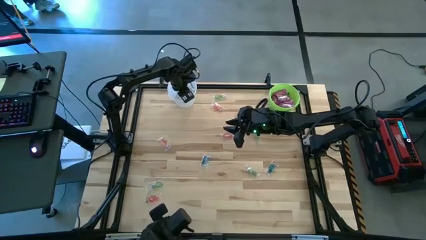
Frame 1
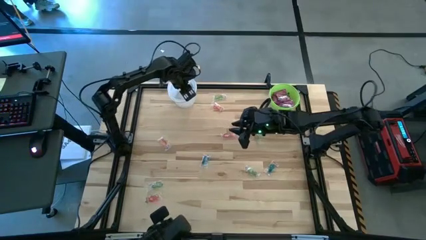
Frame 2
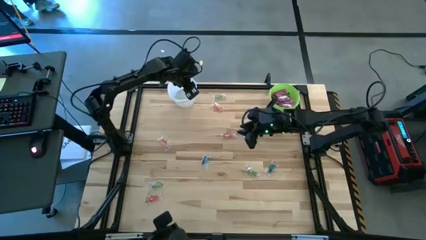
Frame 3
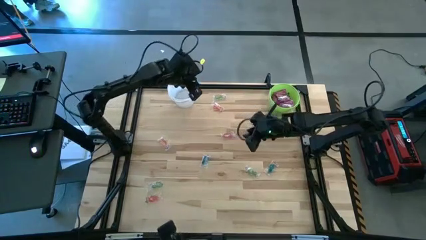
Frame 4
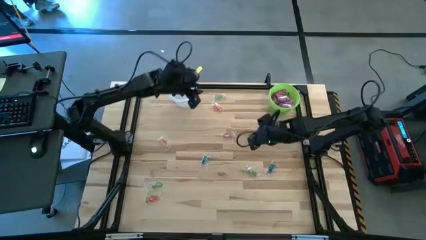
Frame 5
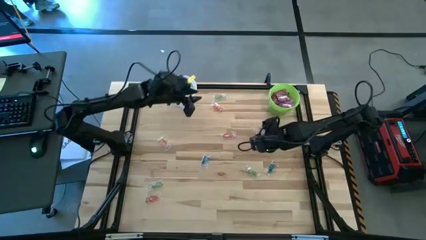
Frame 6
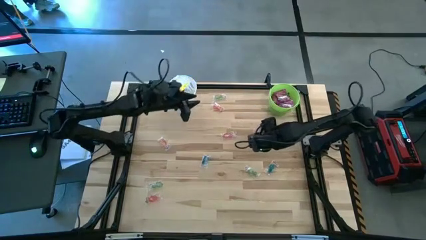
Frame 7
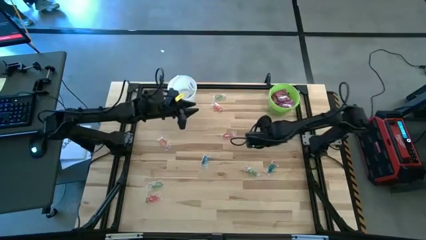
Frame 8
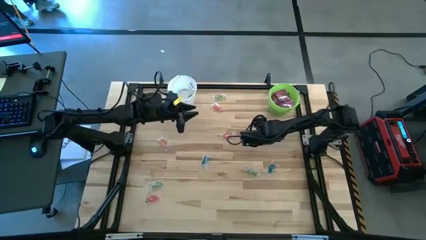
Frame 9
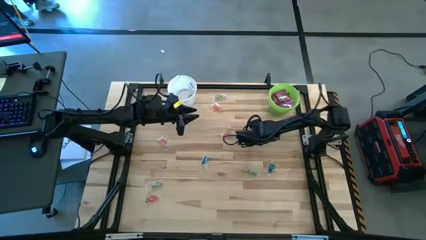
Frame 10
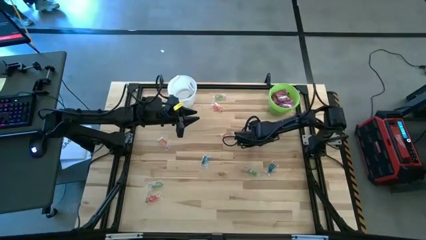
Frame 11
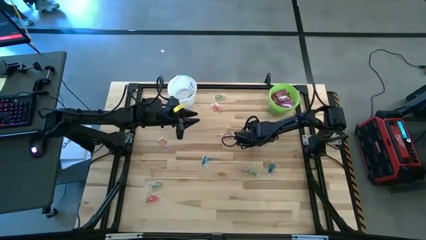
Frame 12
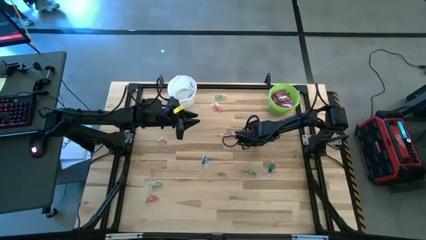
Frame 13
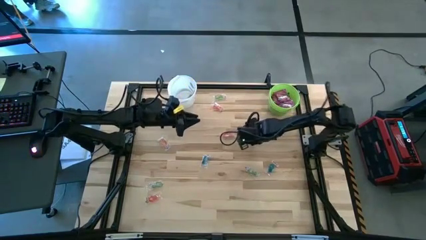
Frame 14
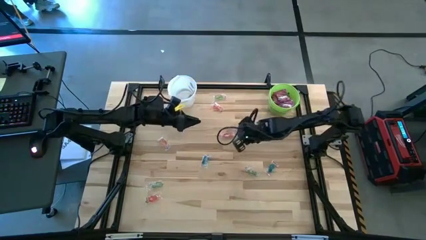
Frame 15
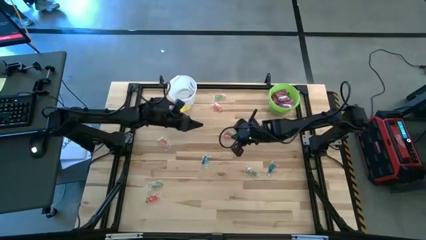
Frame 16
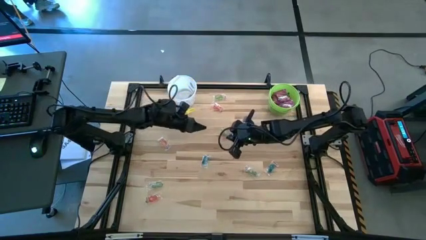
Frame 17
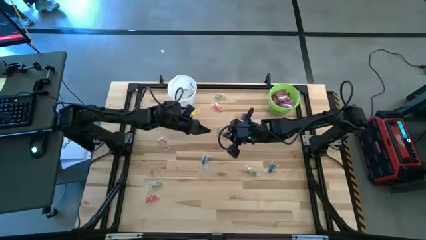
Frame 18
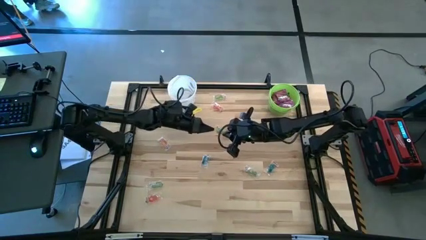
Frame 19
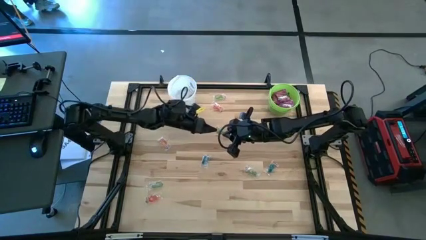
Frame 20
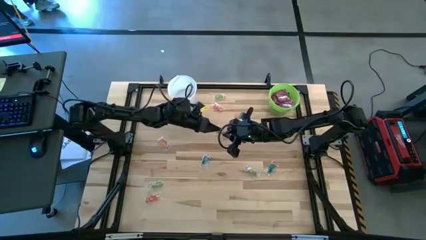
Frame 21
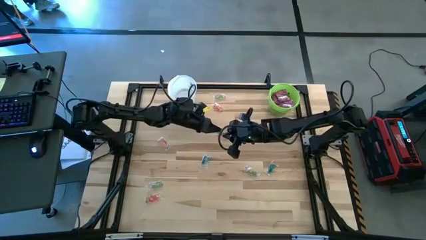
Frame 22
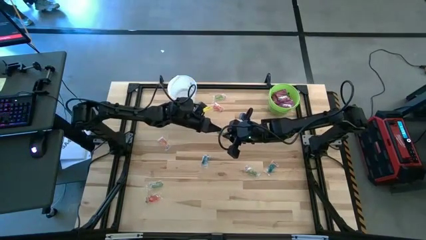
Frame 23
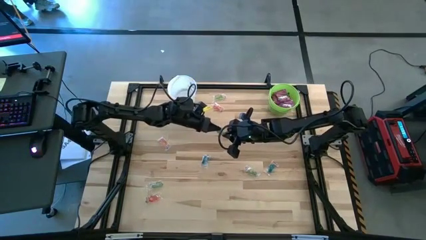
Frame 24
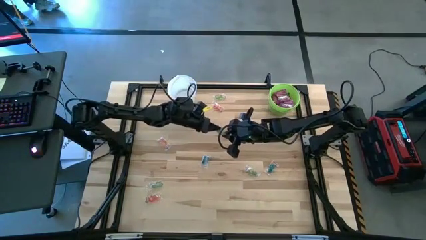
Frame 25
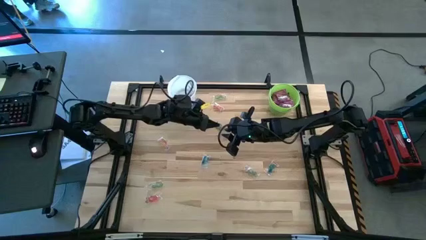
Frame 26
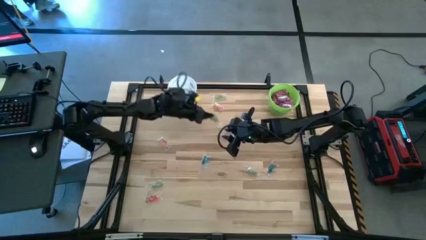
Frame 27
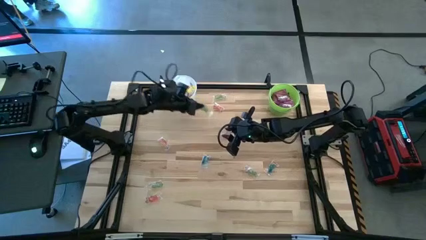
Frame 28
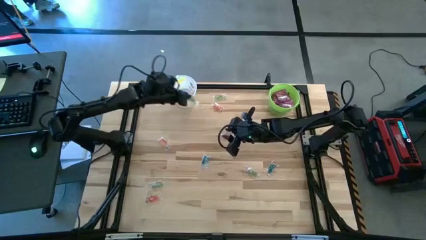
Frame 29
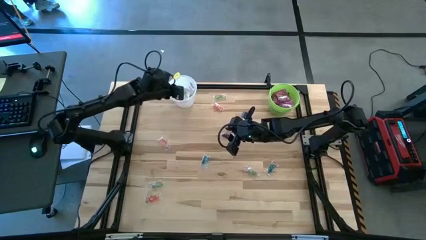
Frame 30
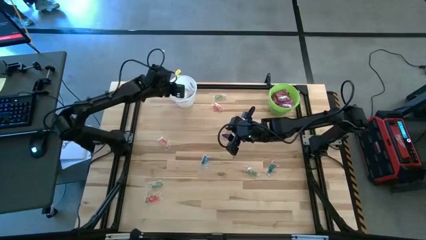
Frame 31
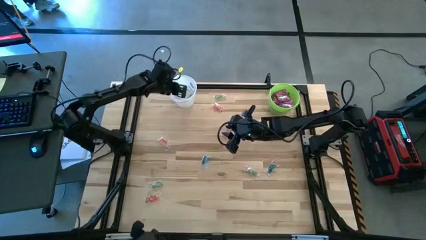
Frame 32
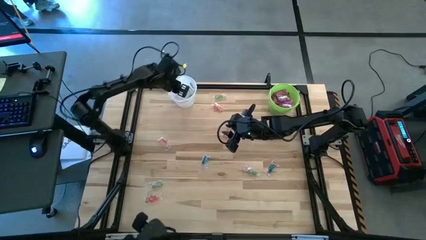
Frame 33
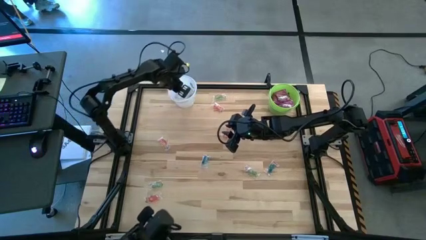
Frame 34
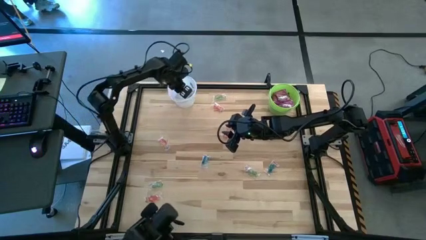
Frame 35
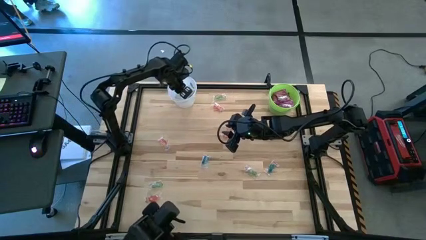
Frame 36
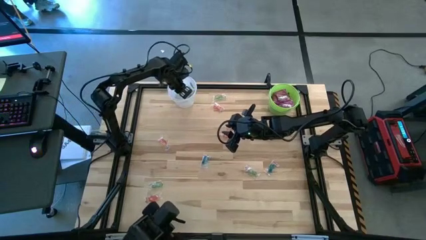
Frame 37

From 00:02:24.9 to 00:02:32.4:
Task: Sort candy by brand, put in halloween buckets
Put the green gummy into the white bucket

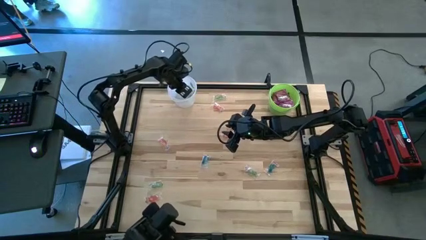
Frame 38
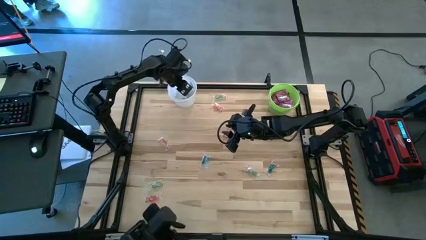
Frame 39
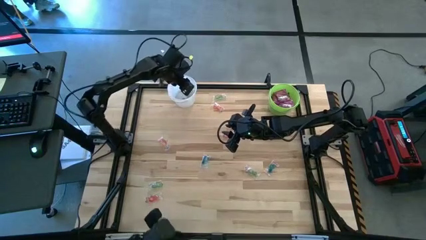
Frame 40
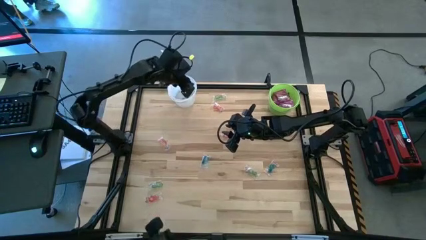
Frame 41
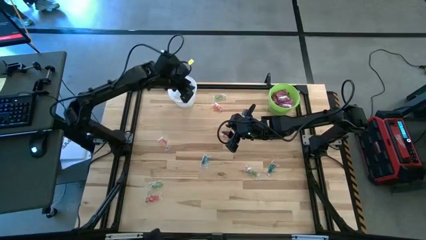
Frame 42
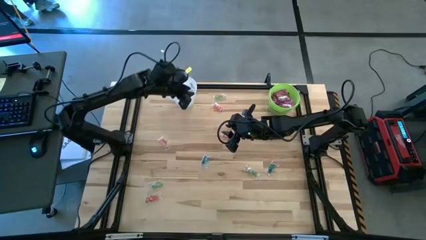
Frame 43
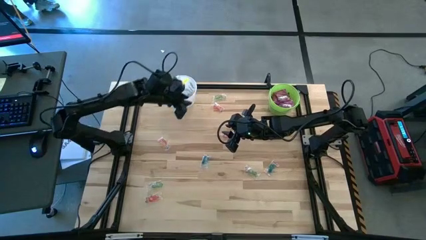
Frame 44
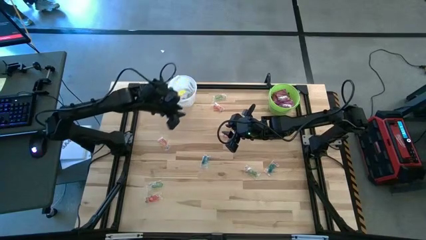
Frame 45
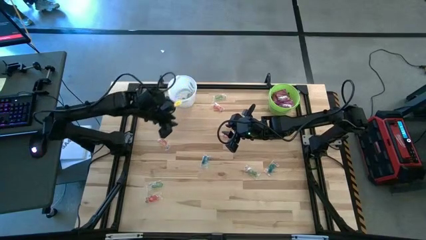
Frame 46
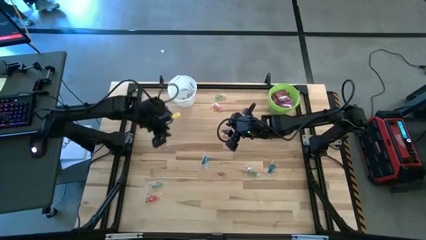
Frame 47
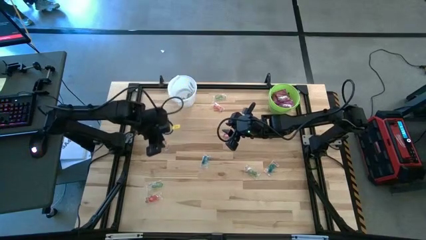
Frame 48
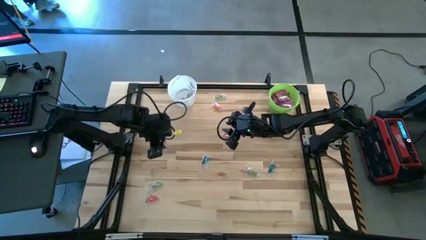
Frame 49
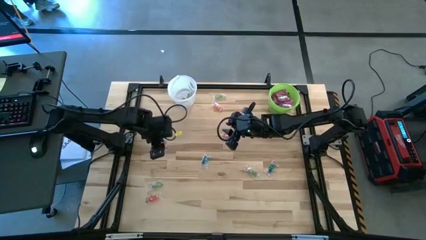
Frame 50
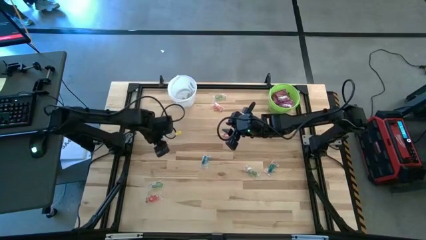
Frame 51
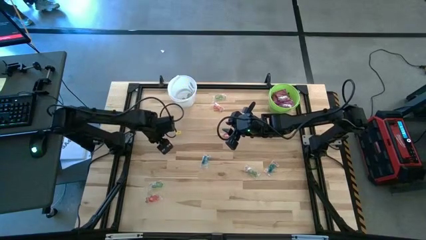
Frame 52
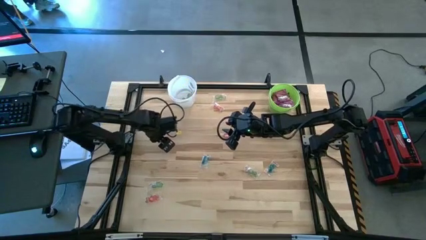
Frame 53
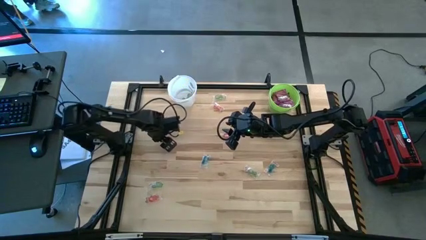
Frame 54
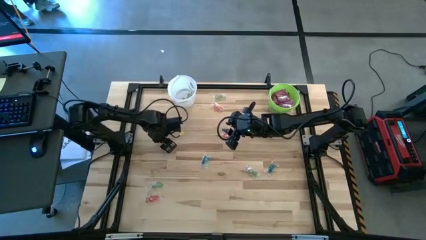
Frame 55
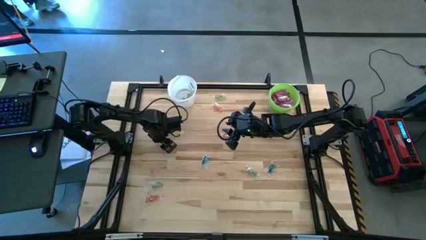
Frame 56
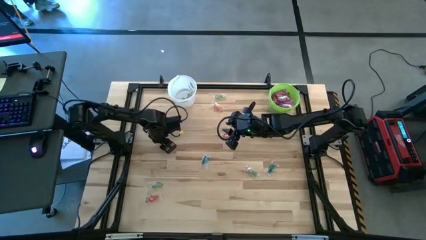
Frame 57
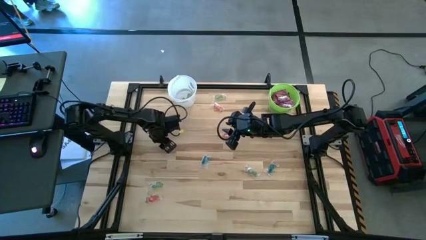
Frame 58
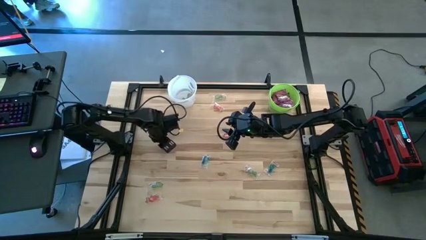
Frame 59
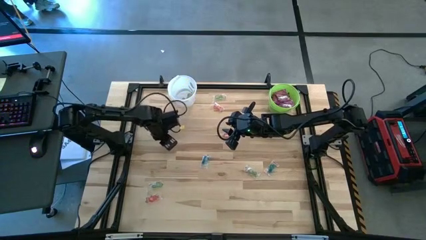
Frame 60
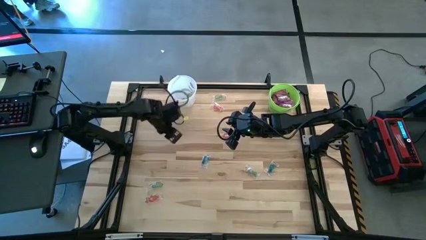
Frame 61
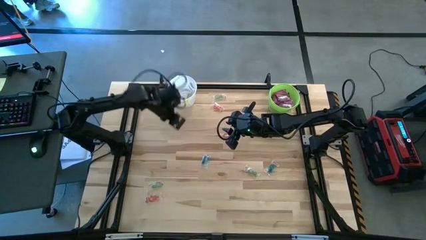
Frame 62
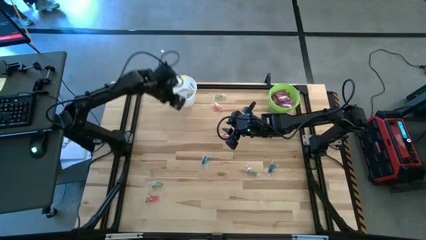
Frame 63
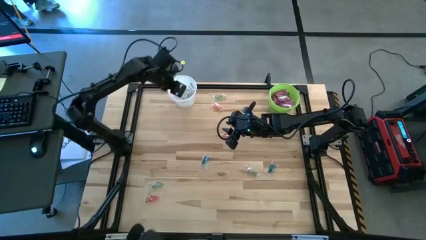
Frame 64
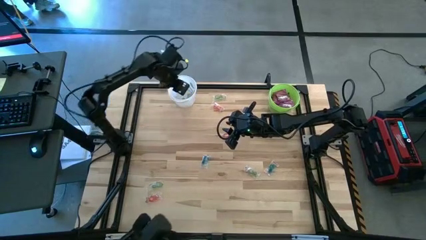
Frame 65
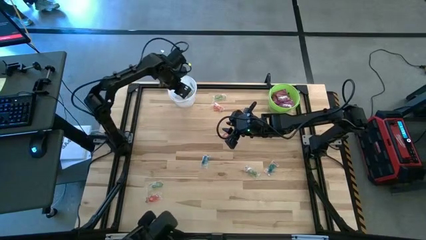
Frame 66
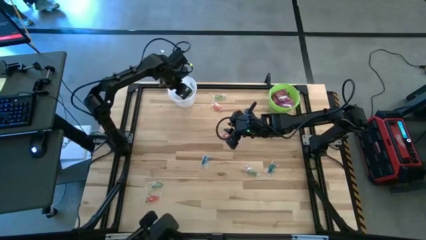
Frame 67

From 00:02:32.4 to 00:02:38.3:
Put the orange gummy into the white bucket

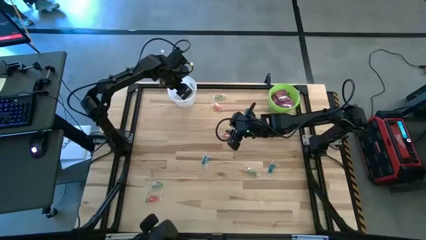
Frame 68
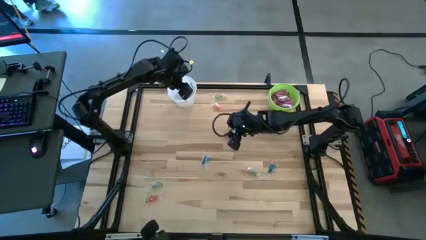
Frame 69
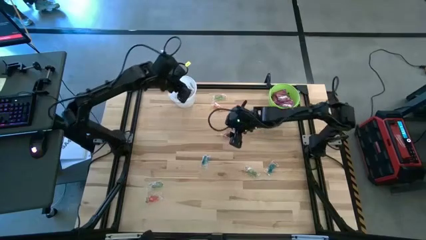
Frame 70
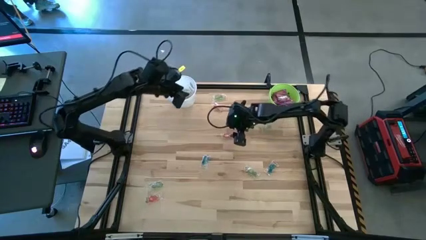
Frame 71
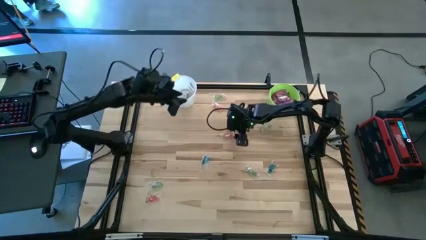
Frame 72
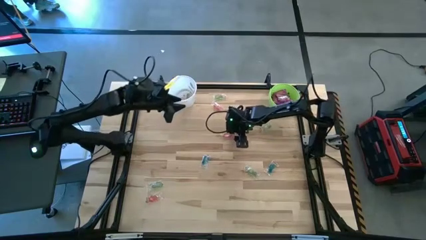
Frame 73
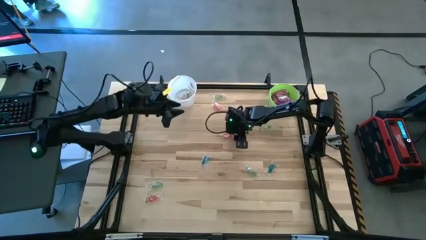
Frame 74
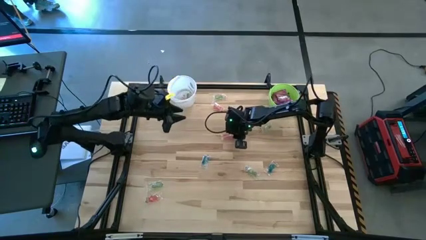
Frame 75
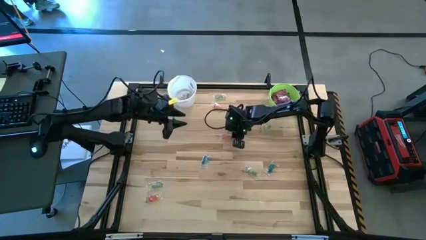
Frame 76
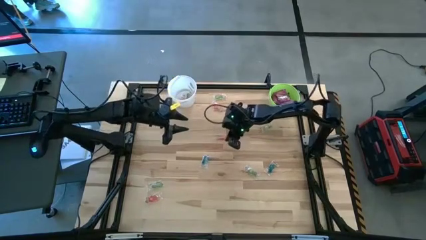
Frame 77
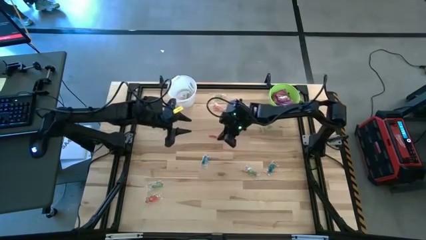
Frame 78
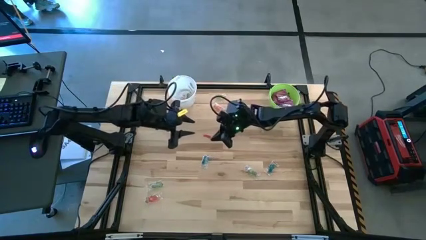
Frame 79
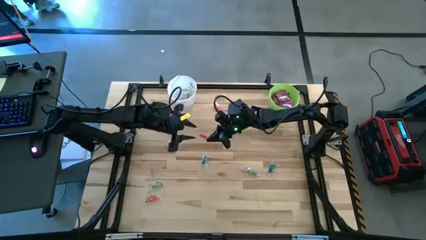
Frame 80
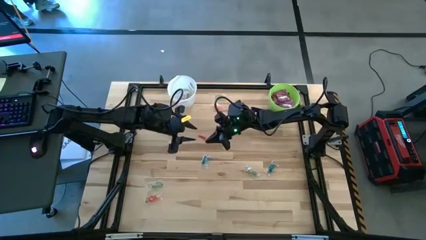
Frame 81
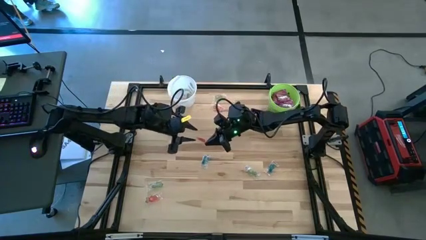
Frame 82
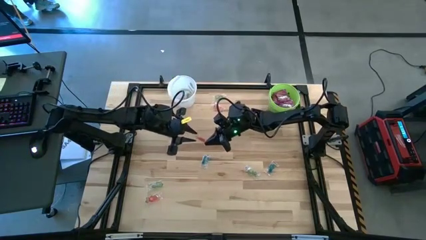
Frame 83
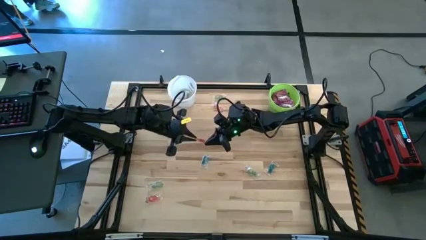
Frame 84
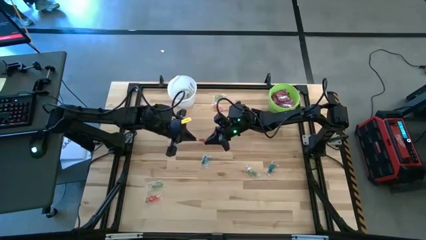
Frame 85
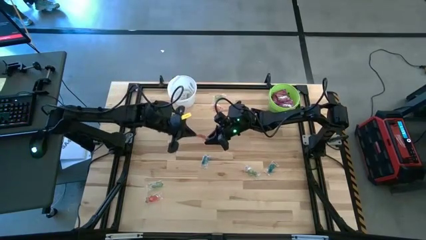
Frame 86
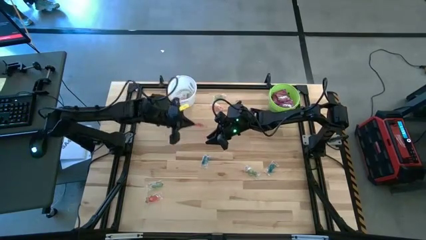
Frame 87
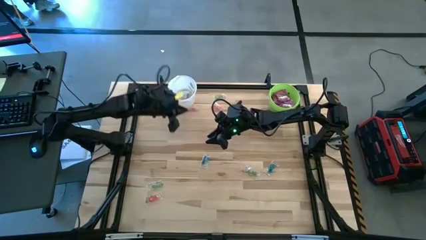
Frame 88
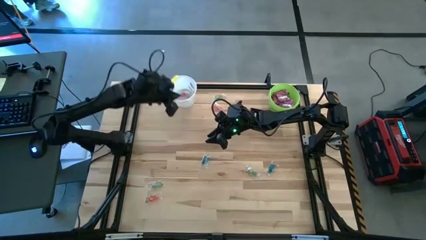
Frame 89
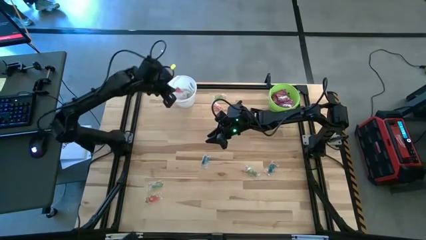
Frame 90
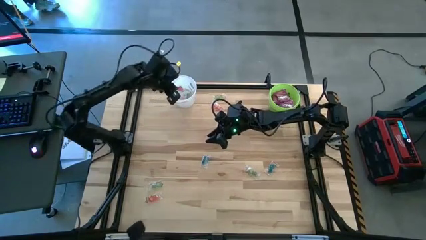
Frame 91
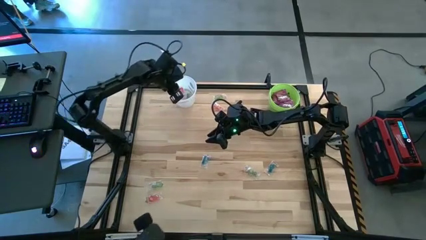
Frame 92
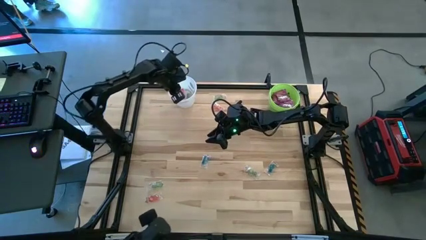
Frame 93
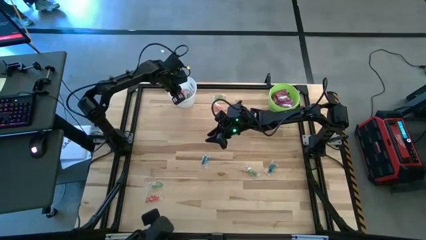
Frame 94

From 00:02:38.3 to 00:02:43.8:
Put the red gummy into the white bucket
